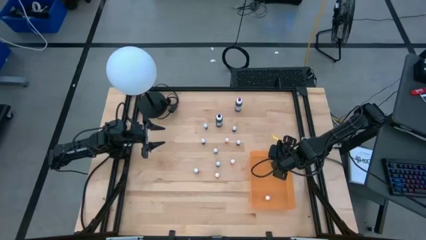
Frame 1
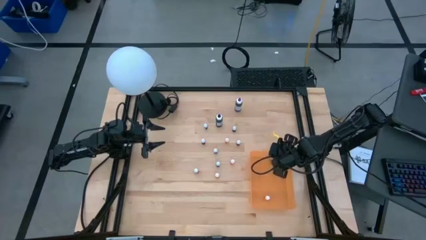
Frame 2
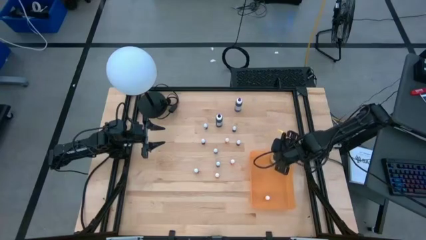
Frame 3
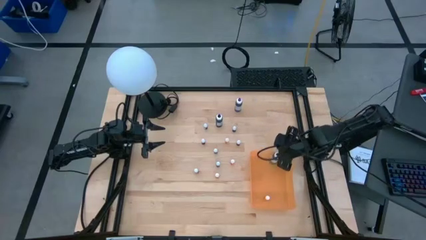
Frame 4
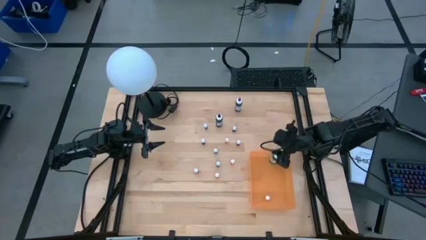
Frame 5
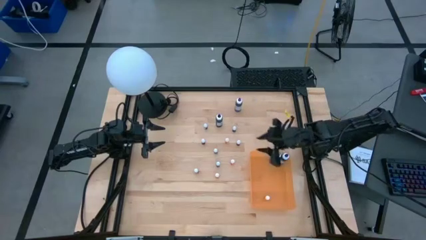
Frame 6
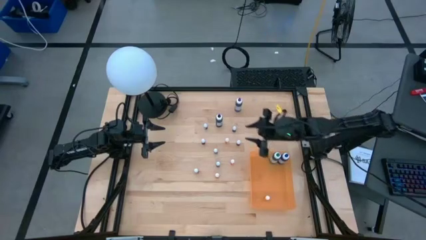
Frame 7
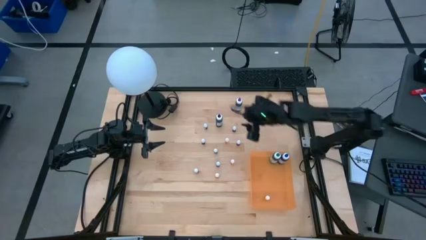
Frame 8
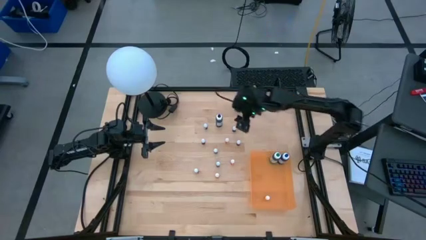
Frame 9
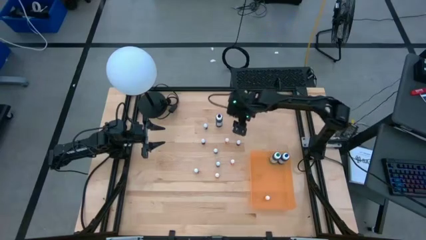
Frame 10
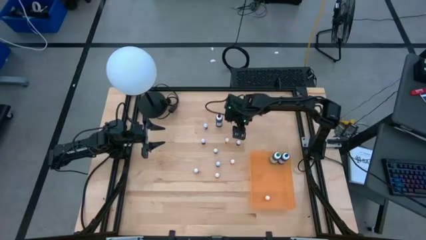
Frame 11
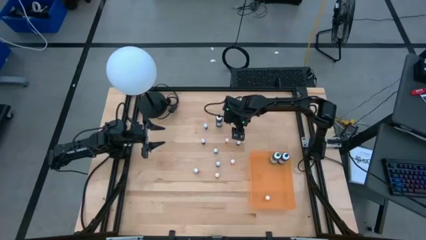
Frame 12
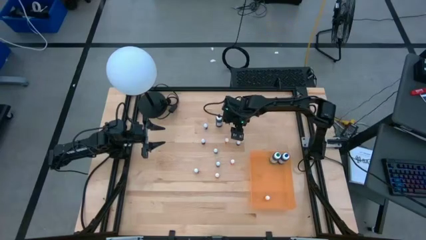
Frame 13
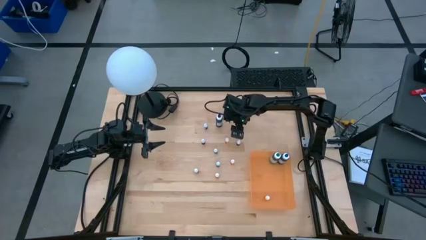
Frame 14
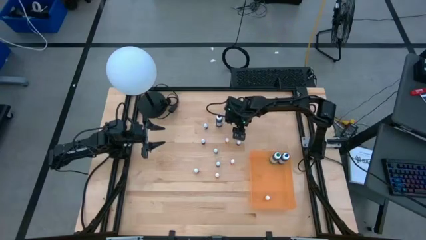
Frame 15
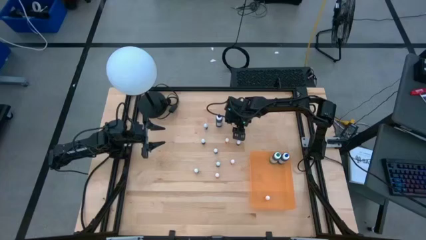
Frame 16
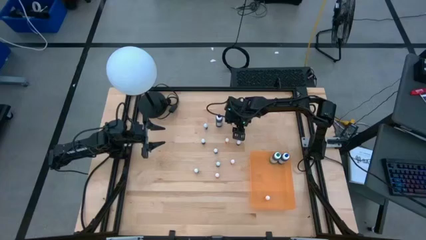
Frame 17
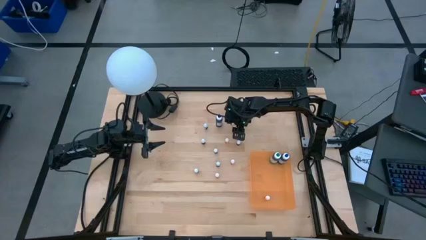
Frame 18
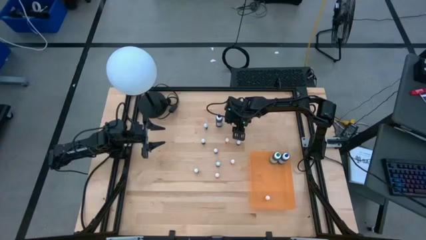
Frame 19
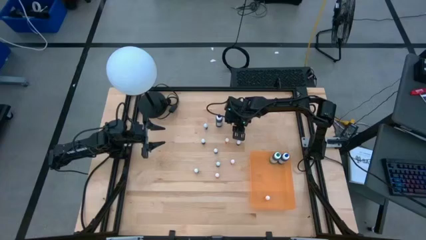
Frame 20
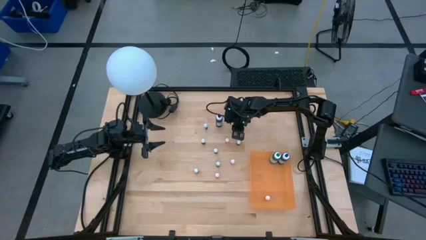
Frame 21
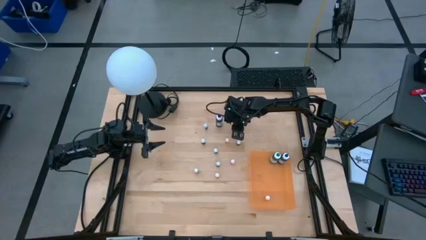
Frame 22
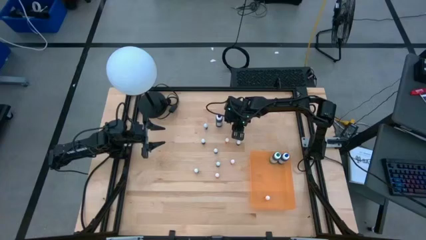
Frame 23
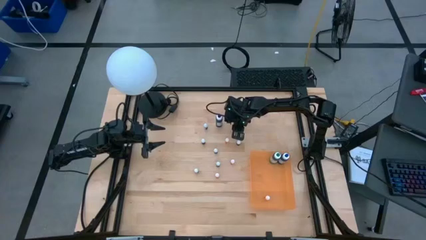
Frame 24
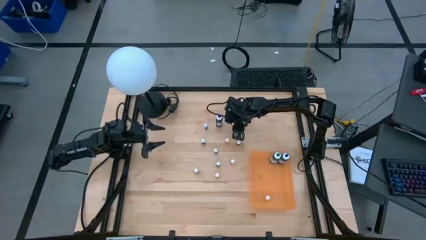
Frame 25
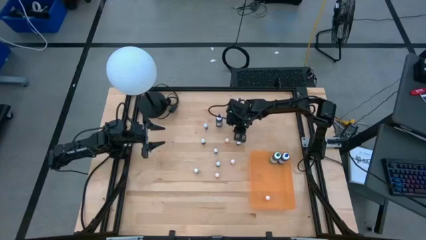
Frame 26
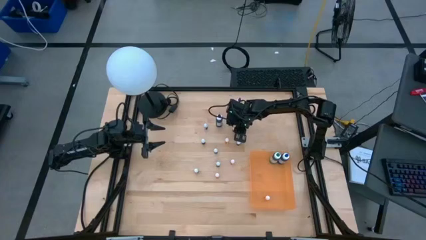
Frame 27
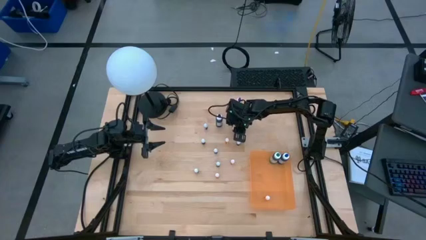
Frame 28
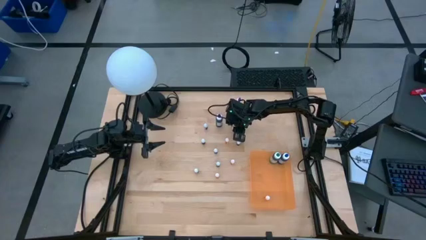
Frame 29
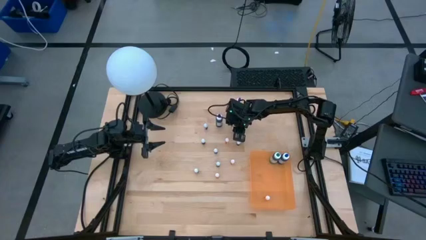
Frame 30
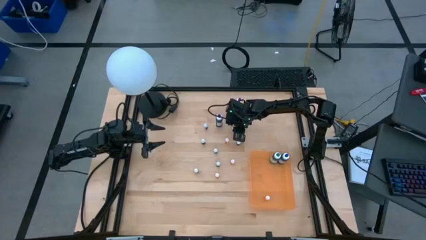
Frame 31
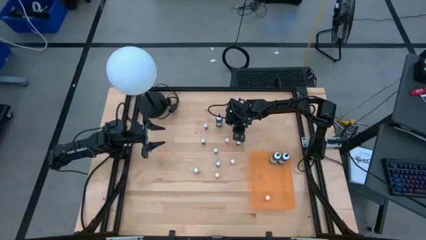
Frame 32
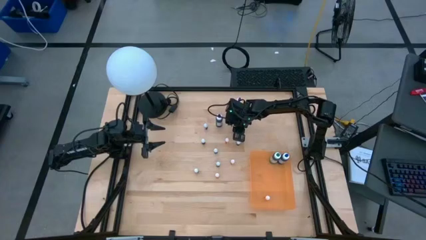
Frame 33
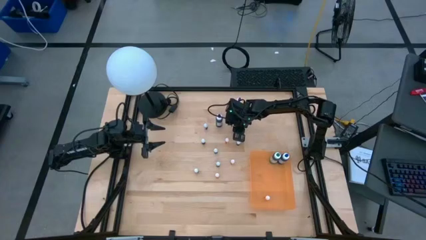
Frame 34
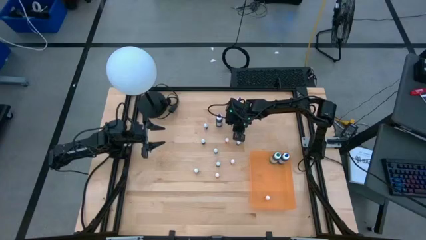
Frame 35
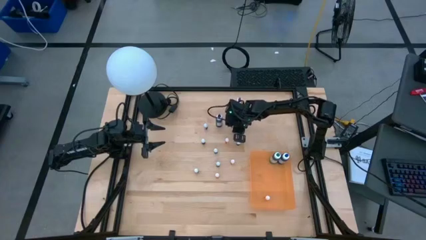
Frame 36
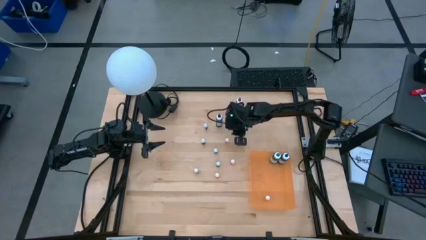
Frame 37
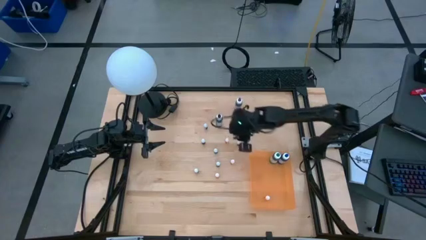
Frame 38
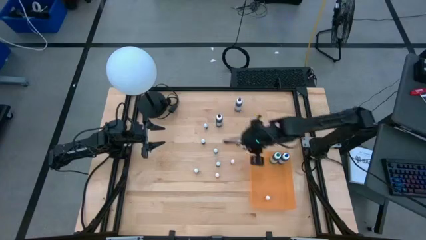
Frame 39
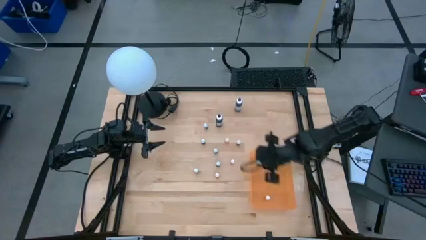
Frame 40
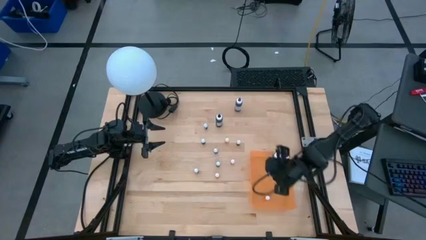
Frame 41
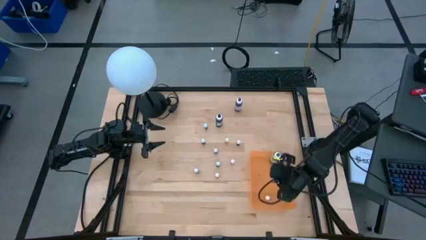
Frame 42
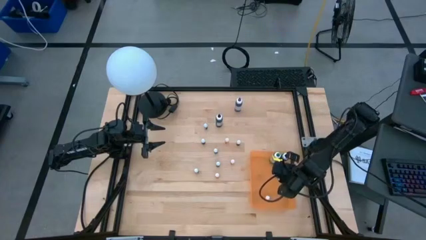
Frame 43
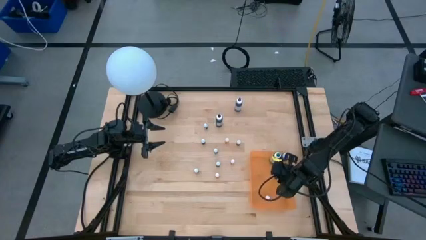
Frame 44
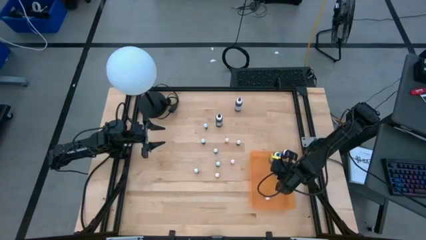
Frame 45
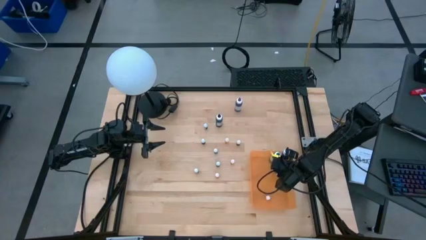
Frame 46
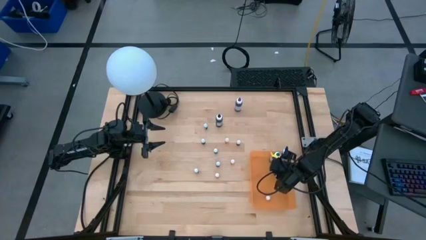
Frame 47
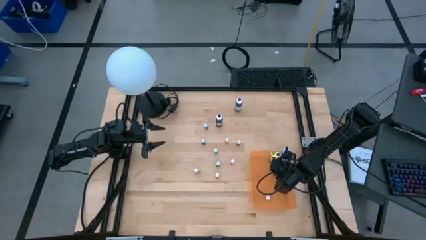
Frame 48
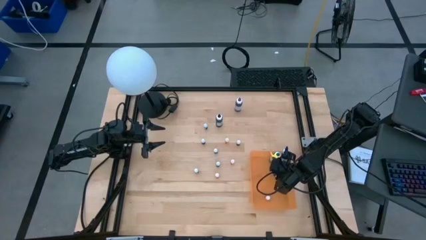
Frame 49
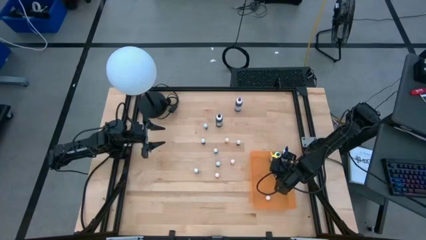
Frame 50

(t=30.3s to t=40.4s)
Task: Pick & Place food coloring
Put the small green food coloring bottle into the orange bin

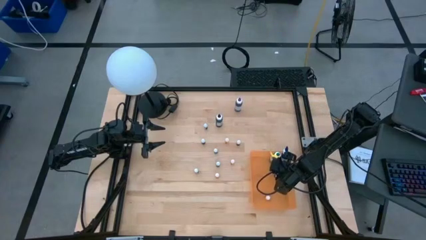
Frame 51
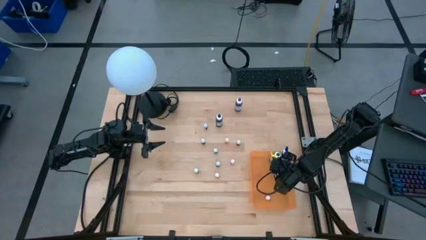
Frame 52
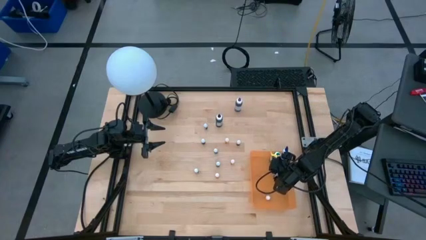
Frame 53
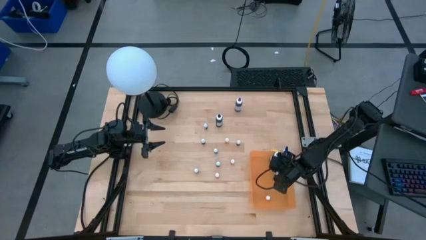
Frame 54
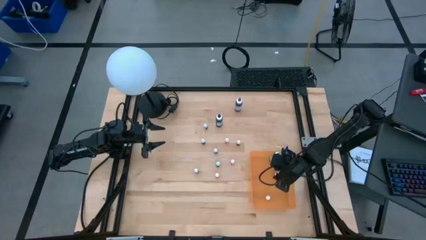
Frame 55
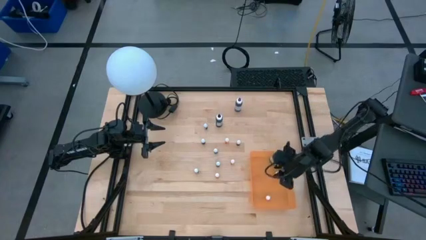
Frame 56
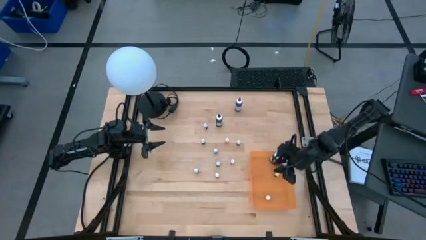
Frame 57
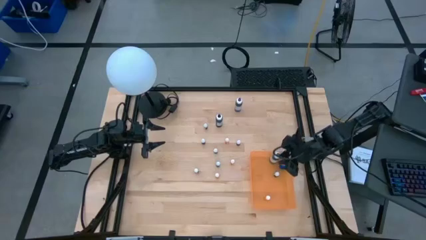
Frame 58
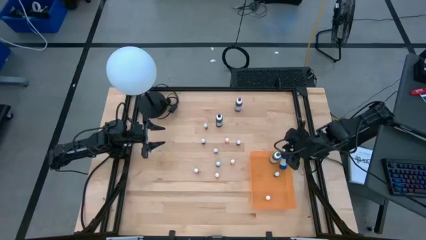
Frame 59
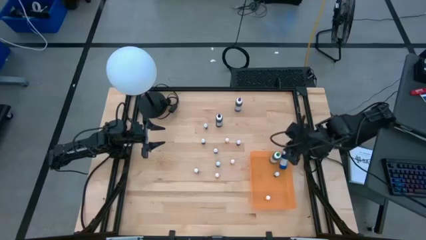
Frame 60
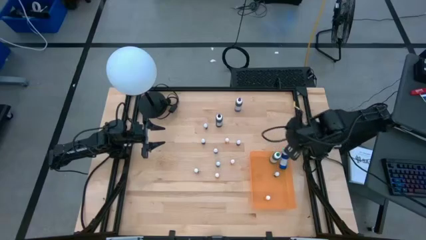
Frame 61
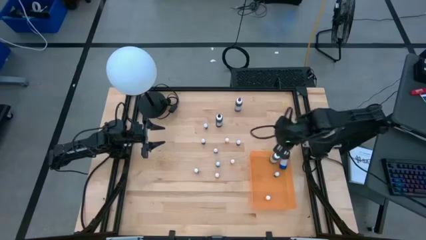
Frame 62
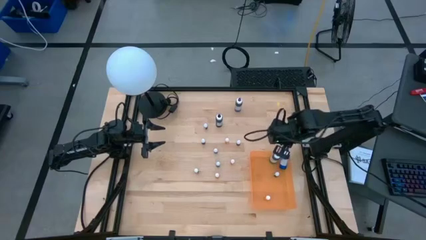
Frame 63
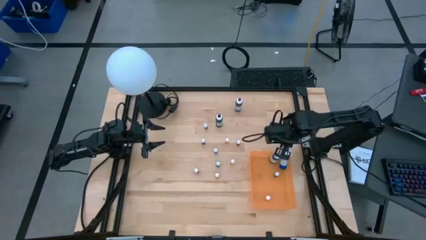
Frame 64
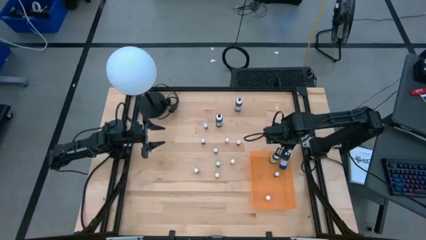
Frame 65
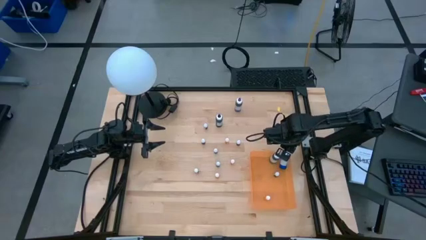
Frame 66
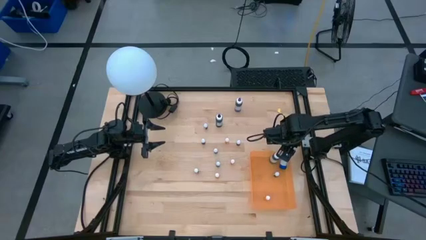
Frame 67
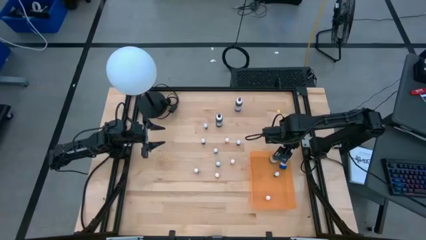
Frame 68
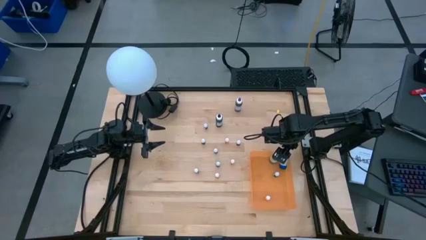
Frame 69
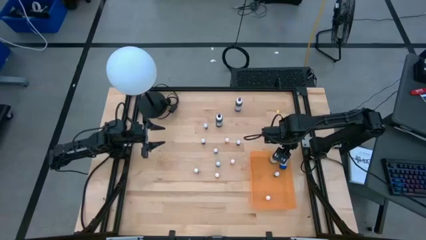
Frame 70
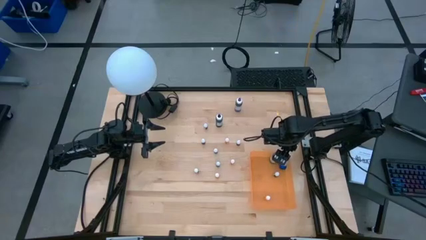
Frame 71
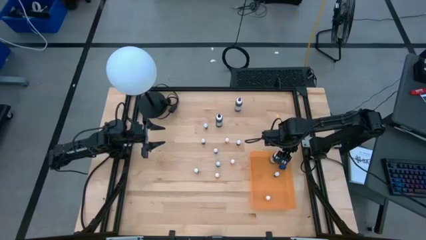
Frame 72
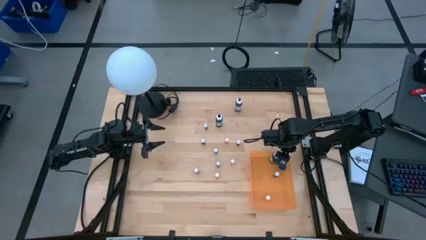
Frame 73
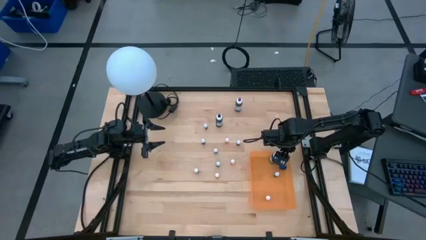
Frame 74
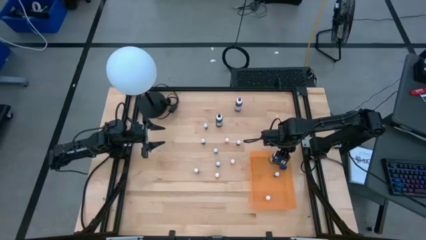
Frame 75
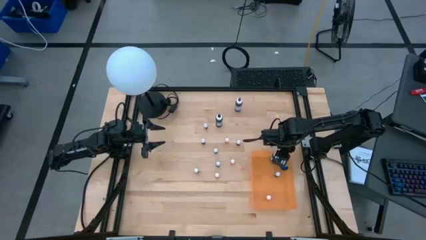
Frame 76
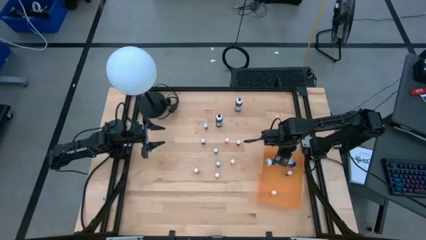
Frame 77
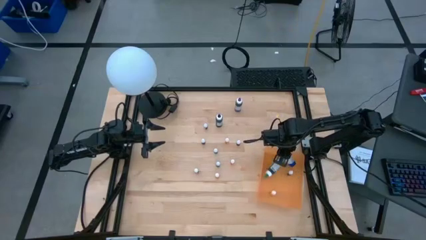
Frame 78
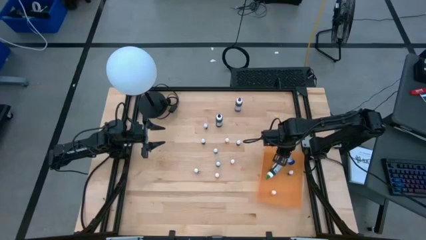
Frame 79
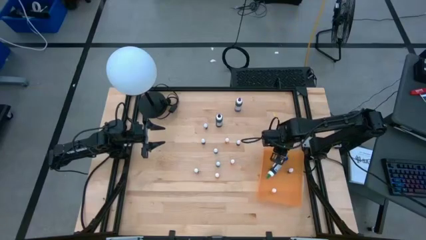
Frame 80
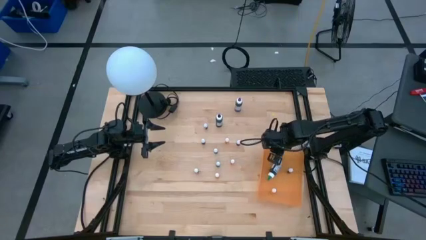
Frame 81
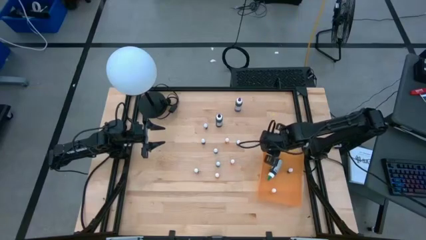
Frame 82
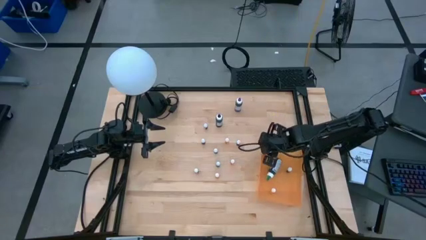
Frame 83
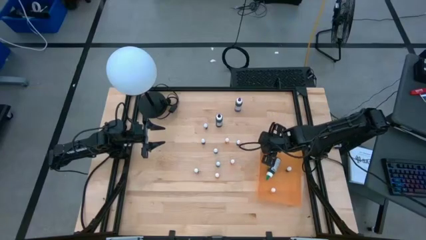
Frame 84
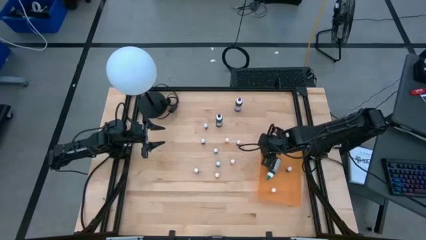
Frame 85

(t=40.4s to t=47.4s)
Adjust the big blue food coloring bottle in the orange bin
